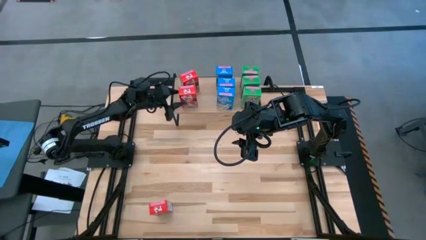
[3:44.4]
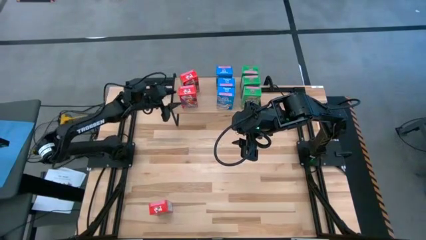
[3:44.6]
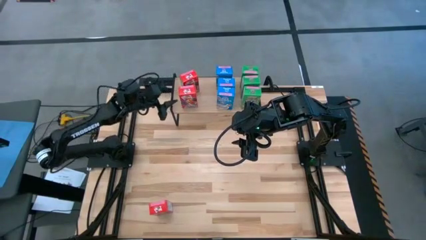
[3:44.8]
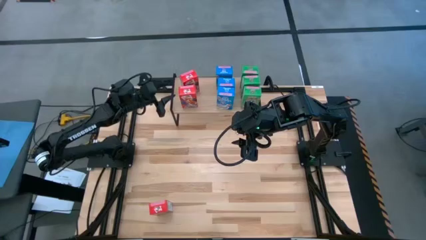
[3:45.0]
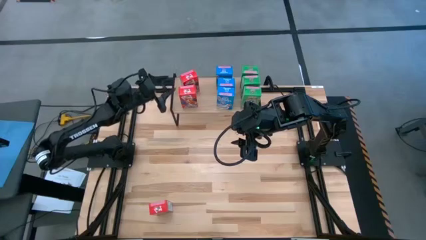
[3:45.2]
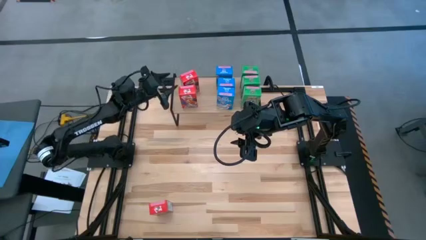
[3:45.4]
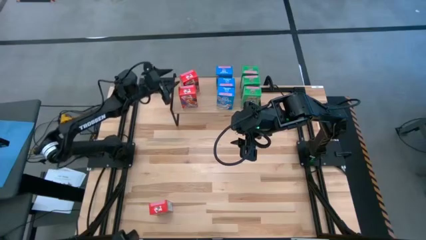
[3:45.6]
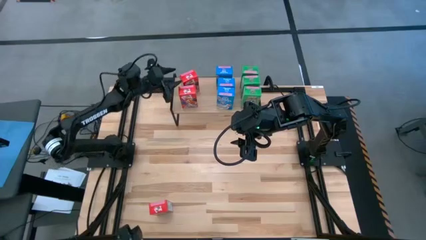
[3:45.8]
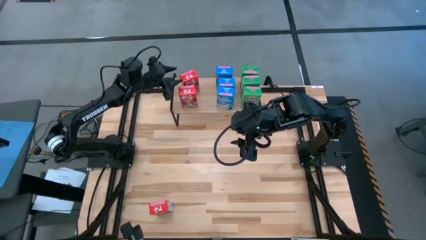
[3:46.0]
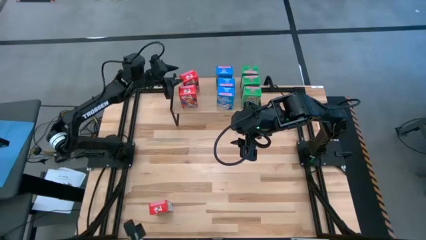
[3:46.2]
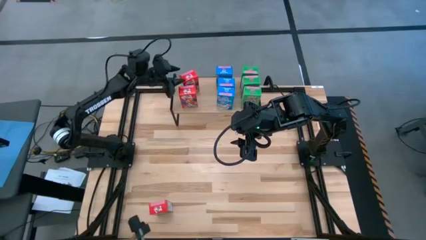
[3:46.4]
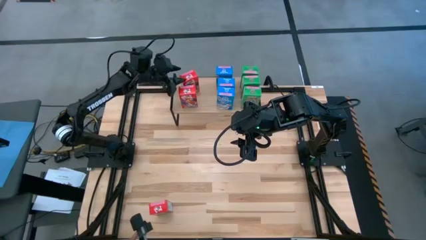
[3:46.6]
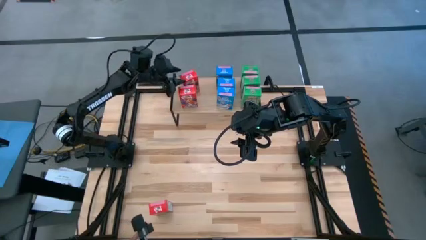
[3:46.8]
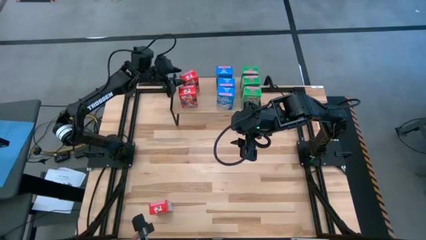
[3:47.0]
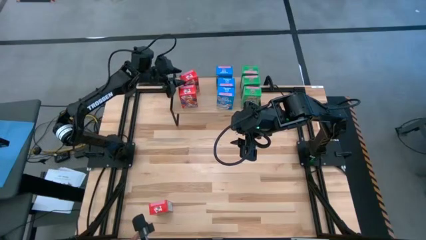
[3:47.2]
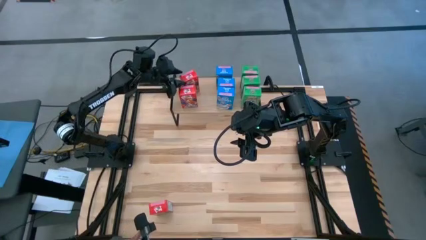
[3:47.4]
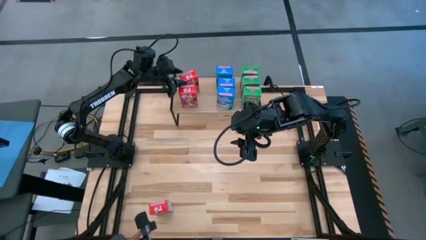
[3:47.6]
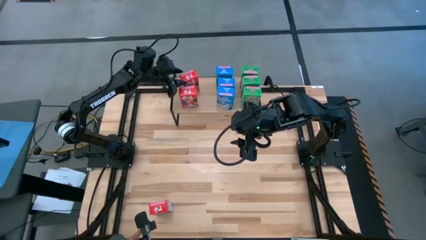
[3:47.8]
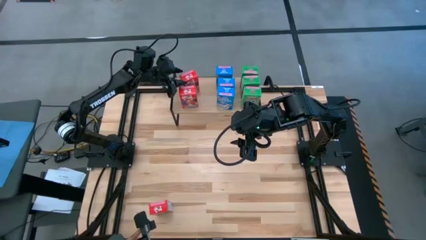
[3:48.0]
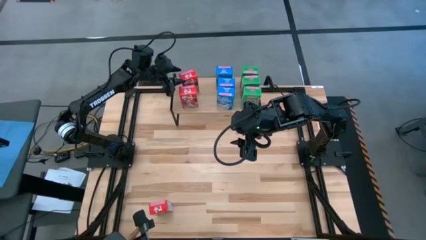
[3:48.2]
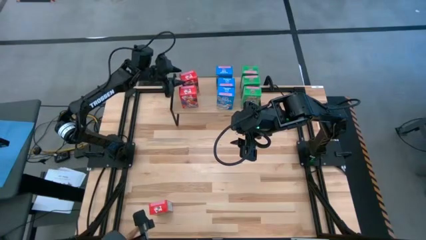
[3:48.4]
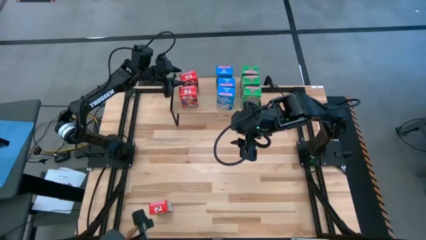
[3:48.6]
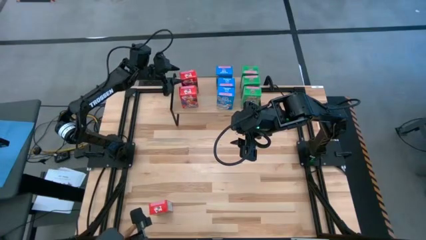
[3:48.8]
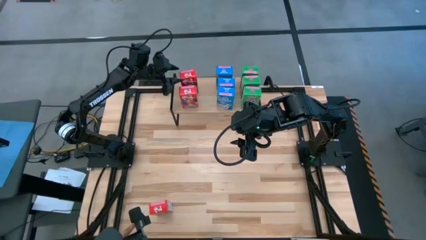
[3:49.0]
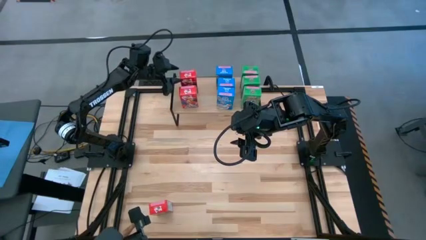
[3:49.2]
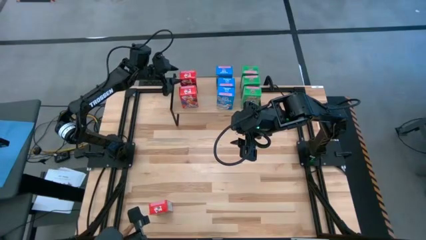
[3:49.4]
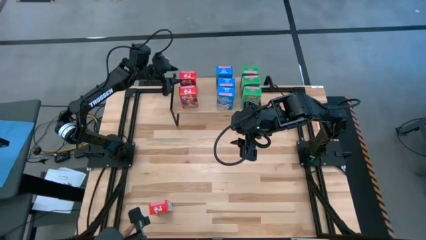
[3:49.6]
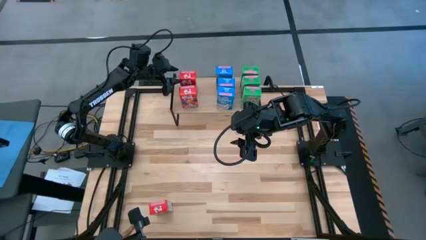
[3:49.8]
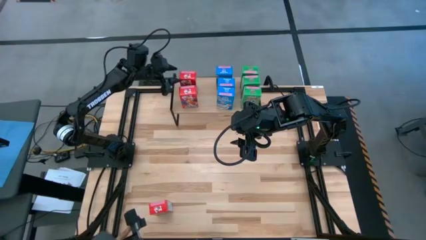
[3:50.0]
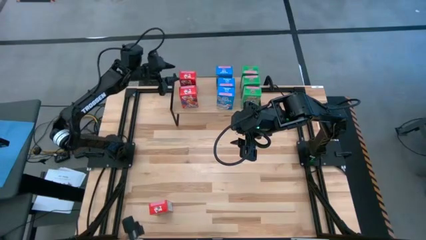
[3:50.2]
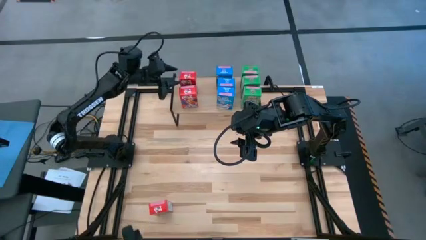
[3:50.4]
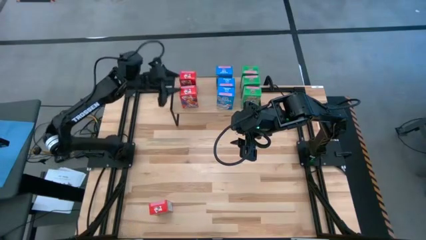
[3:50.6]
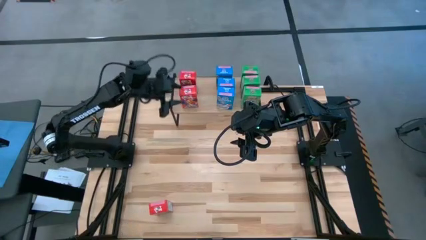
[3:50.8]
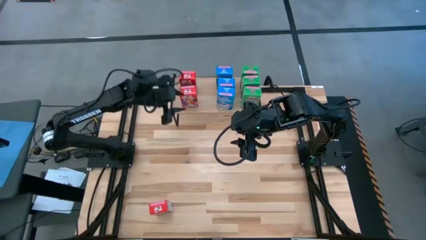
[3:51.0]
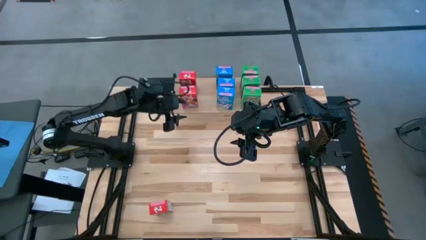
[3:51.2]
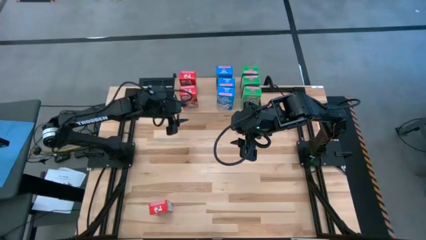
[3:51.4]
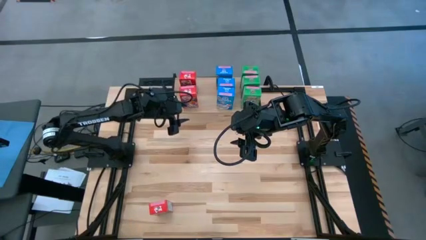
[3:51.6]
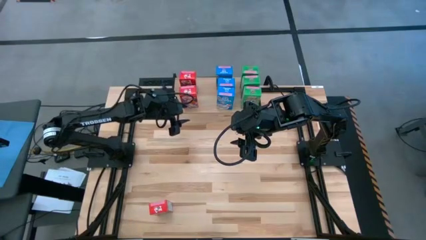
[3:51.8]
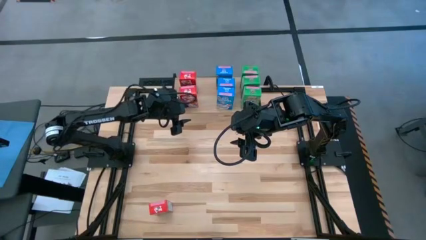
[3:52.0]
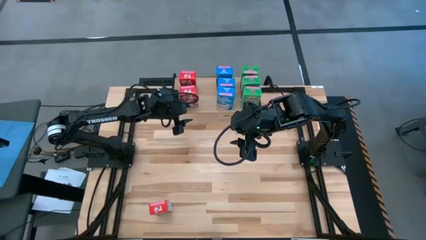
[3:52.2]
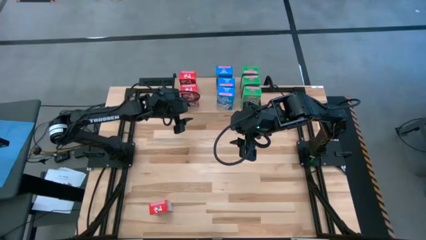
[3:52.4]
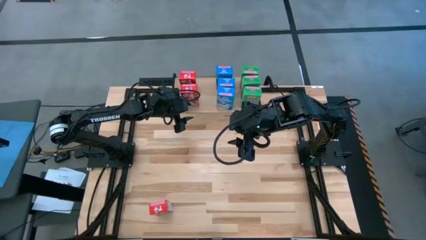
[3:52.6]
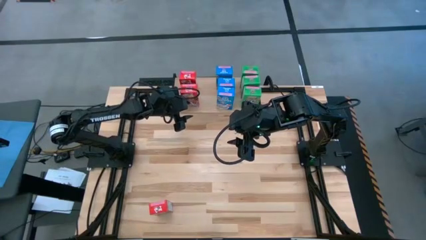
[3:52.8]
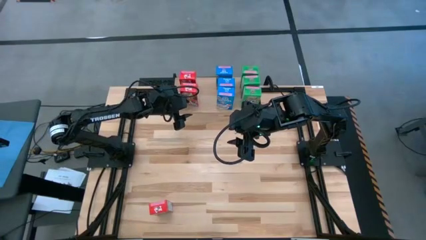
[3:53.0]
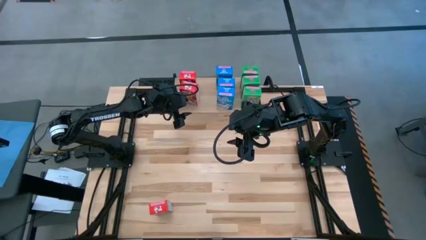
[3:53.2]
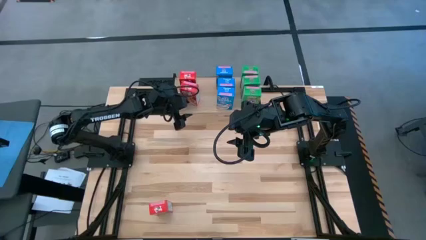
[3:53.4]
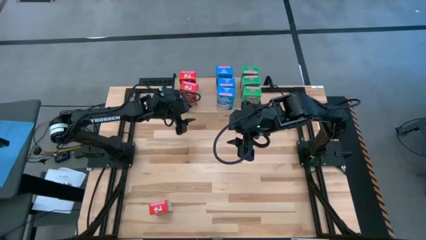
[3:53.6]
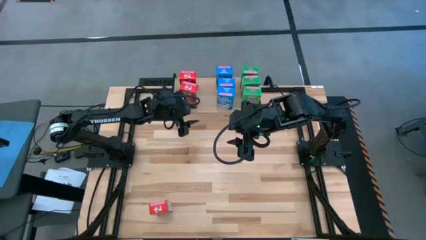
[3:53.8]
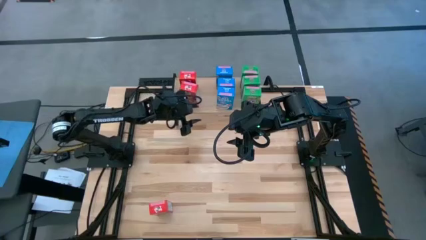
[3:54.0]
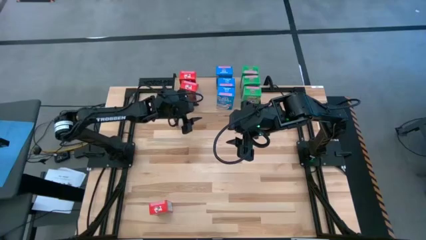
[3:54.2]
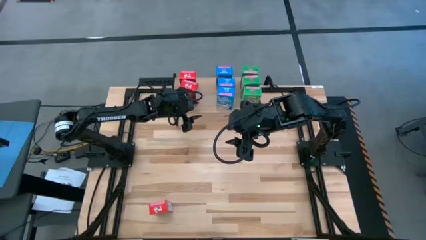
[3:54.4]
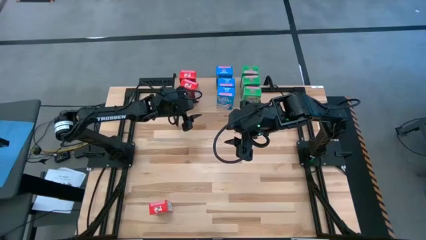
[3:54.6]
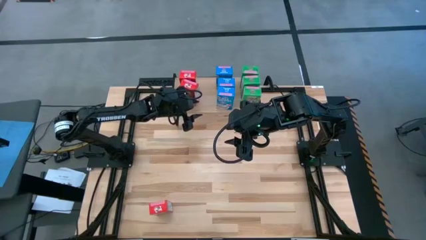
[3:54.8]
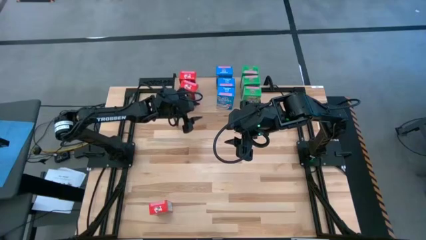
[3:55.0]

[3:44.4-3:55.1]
Task: Stack cereal on shelf
Adjust the red cereal boxes on the shelf

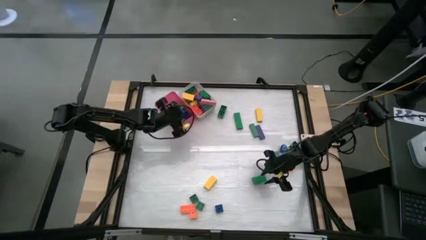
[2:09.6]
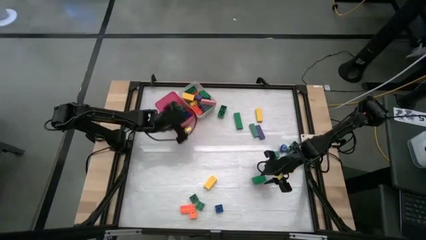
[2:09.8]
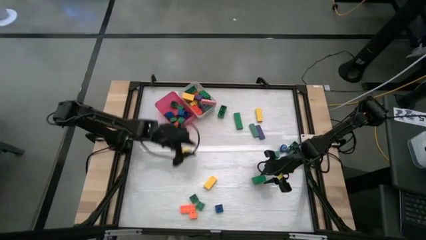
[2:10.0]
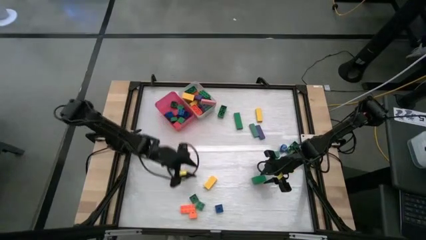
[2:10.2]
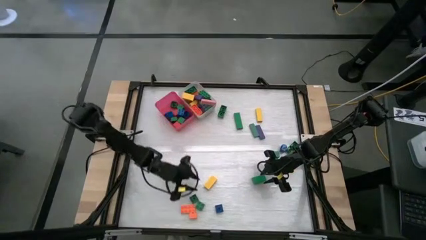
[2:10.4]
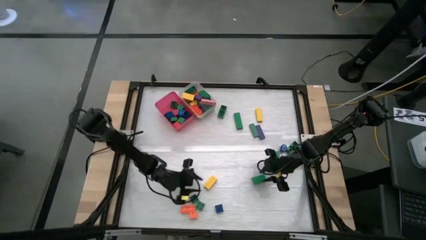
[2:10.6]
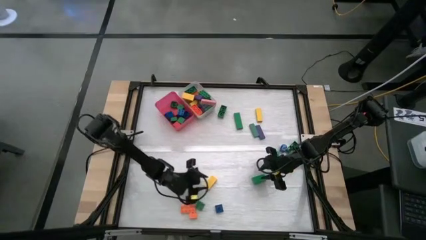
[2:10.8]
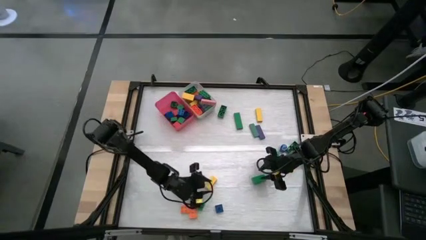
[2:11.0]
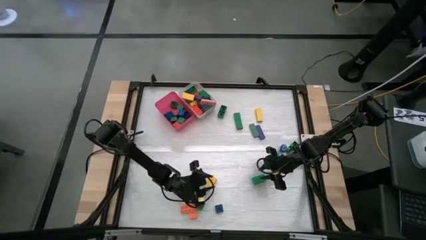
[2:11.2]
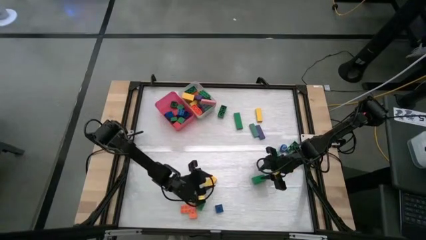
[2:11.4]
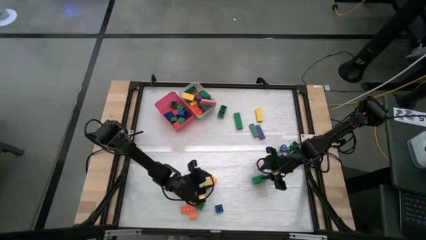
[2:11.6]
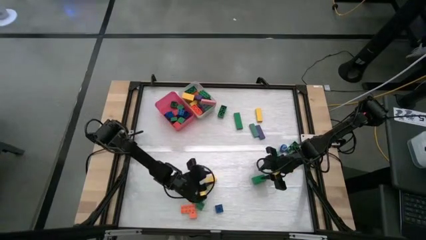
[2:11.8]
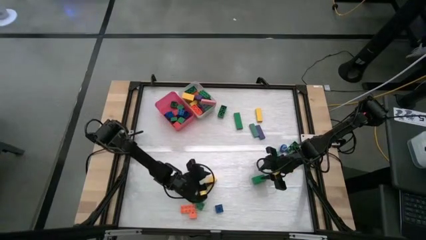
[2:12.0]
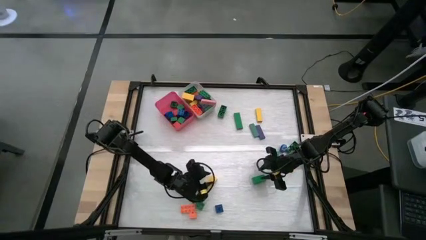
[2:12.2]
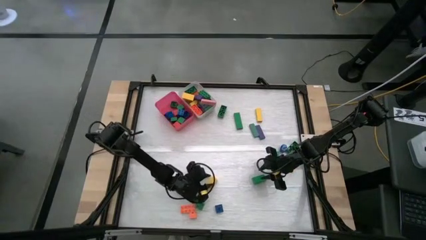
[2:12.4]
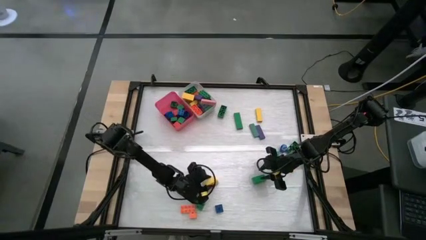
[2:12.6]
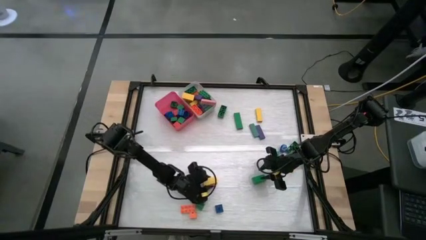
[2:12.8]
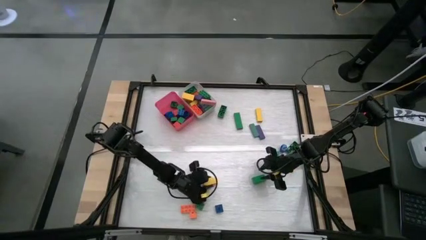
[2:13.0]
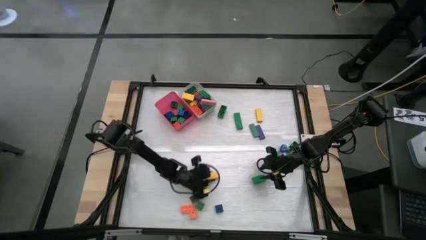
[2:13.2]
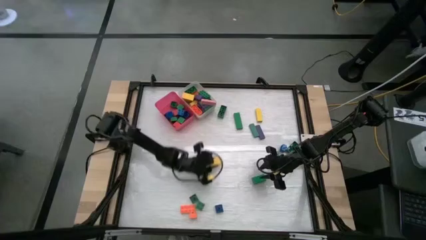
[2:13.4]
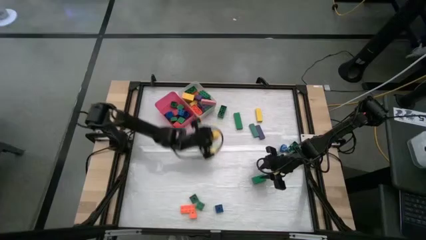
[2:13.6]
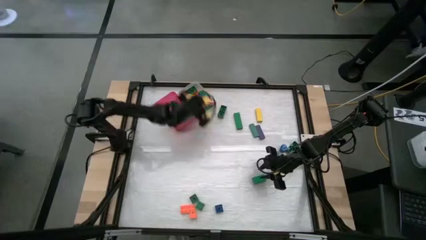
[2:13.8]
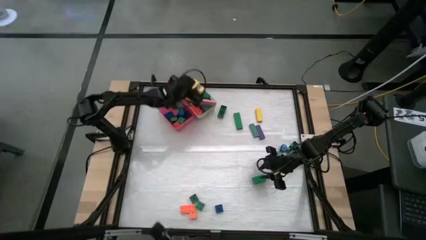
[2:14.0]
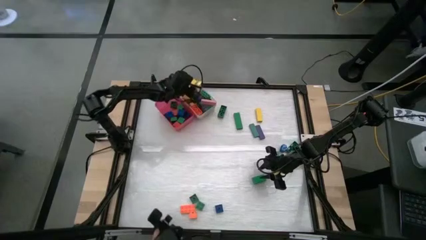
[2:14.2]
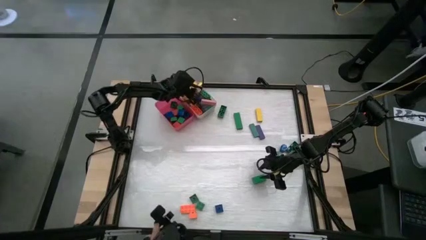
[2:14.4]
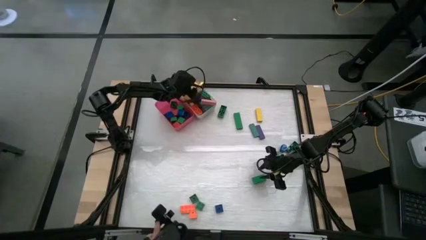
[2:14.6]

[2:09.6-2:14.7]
Task: Sort blocks by size
Put the big yellow block into the white bin
